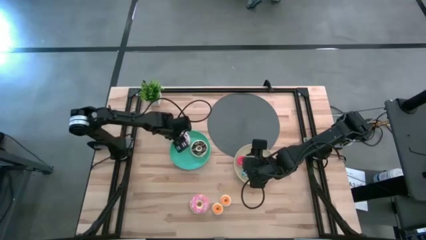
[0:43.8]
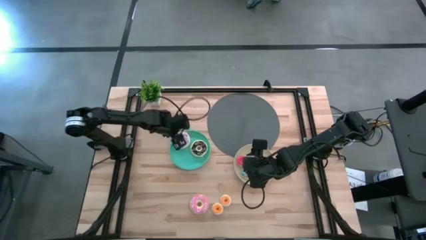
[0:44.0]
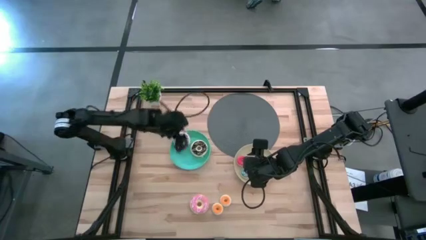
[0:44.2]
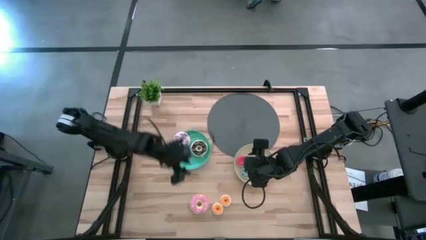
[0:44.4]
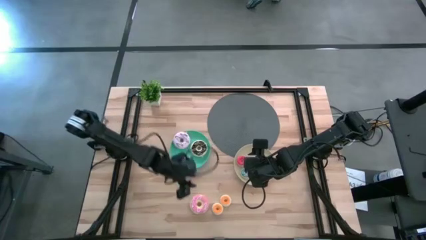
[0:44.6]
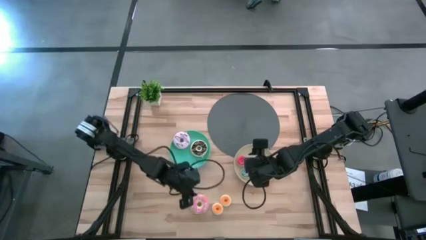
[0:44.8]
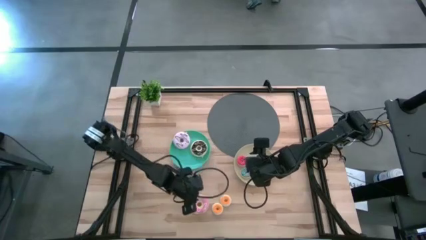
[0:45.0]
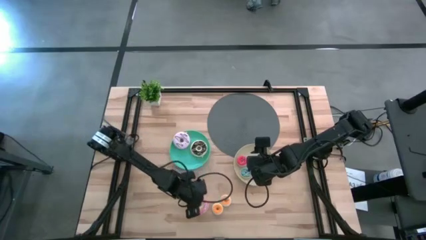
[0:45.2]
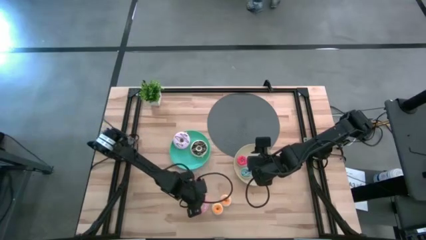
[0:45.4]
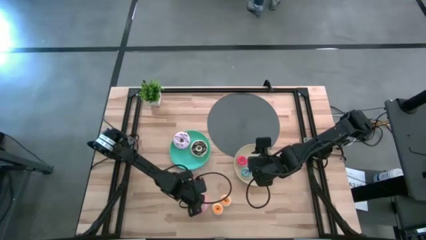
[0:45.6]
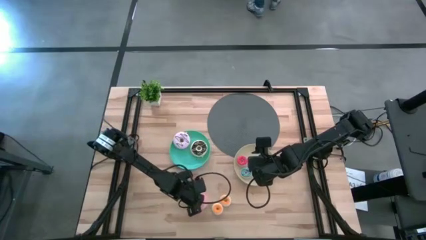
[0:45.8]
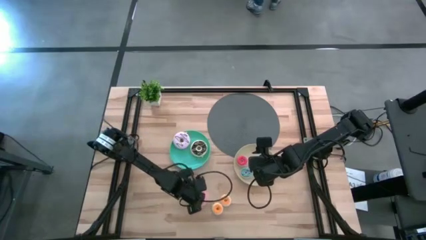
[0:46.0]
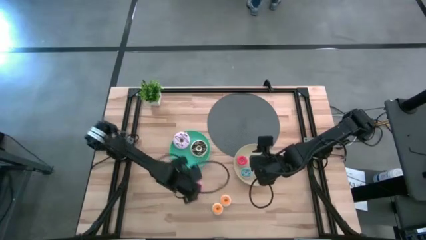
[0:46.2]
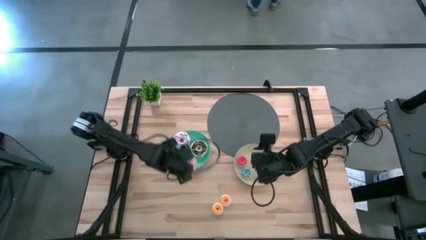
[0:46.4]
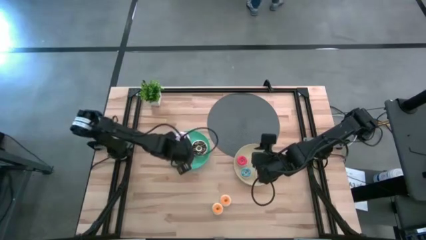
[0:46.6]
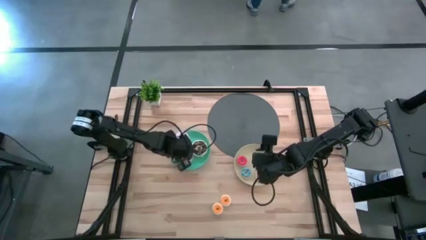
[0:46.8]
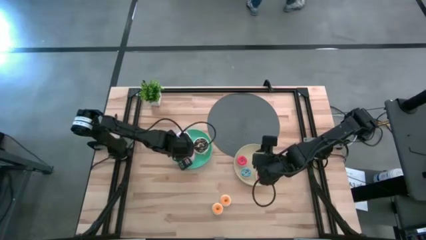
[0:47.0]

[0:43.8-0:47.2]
Task: Pick & Place donuts
Put the big pink doughnut on the blue plate

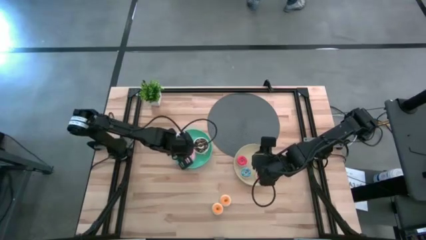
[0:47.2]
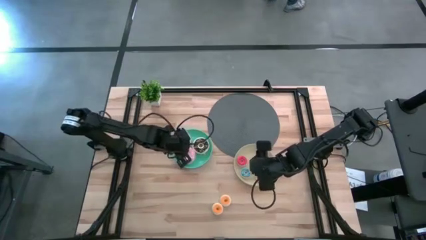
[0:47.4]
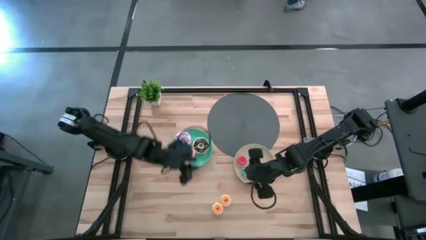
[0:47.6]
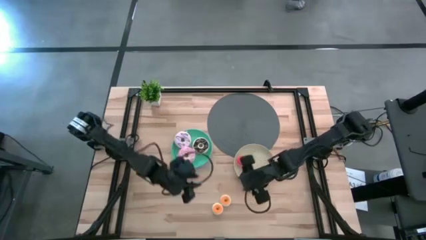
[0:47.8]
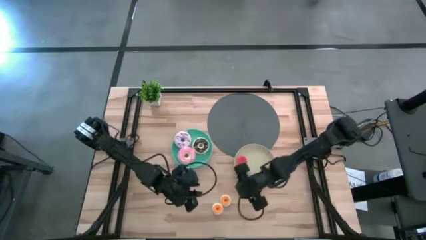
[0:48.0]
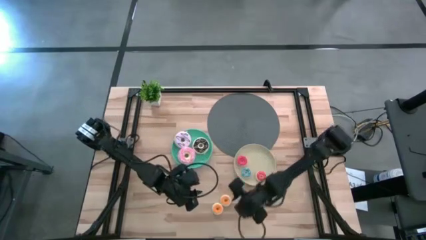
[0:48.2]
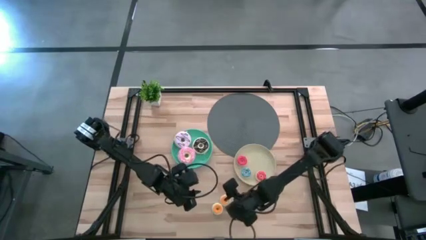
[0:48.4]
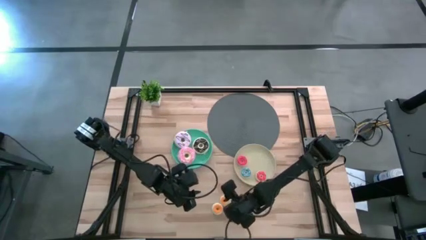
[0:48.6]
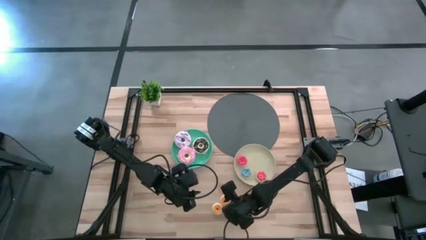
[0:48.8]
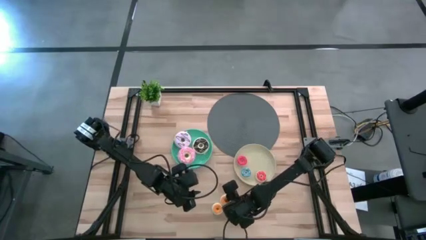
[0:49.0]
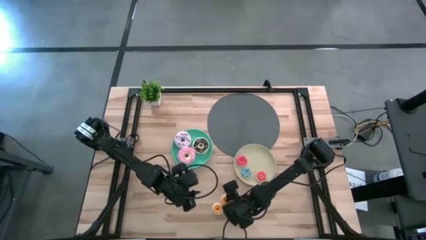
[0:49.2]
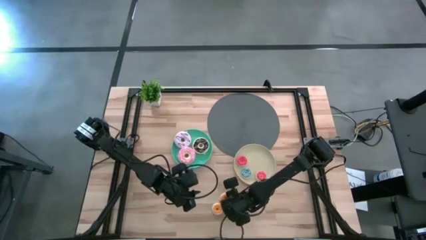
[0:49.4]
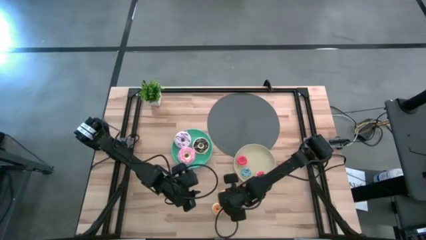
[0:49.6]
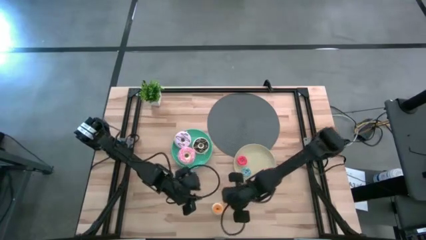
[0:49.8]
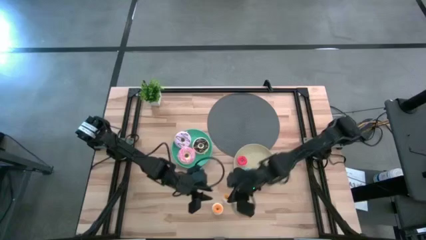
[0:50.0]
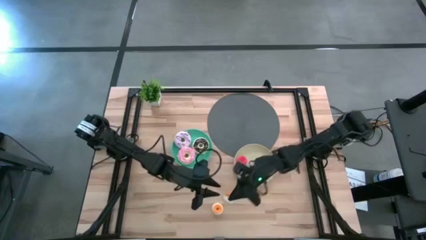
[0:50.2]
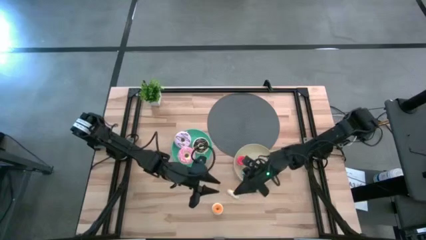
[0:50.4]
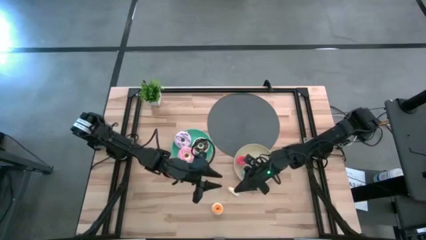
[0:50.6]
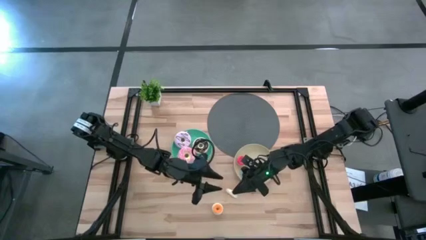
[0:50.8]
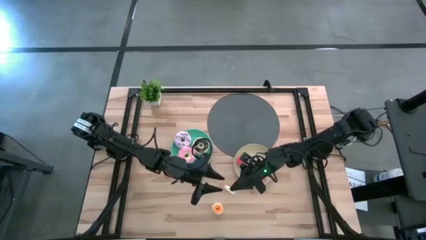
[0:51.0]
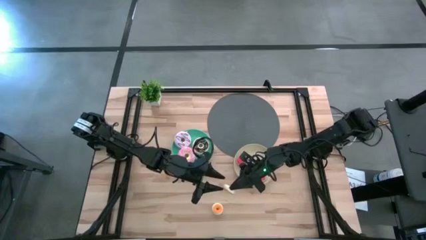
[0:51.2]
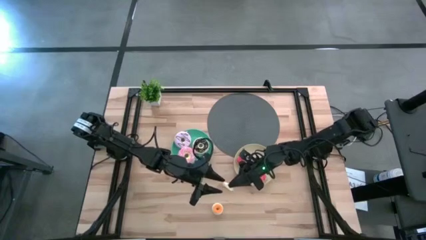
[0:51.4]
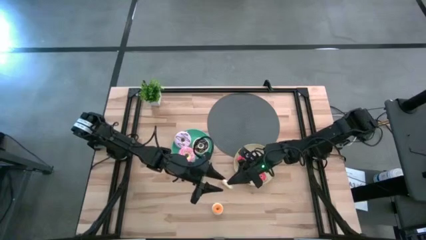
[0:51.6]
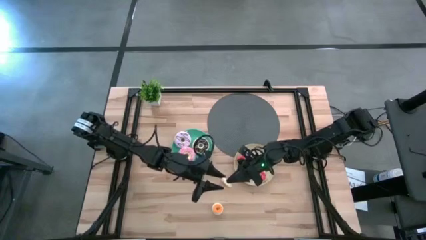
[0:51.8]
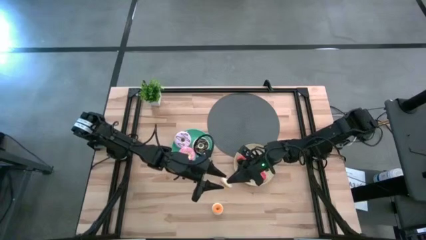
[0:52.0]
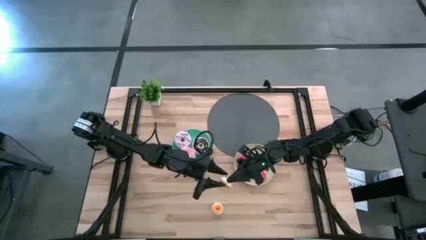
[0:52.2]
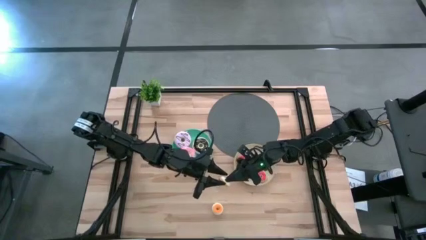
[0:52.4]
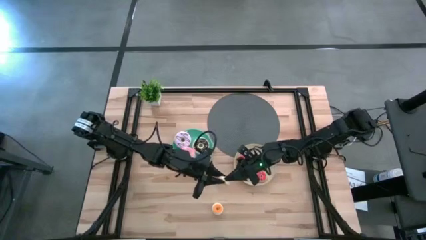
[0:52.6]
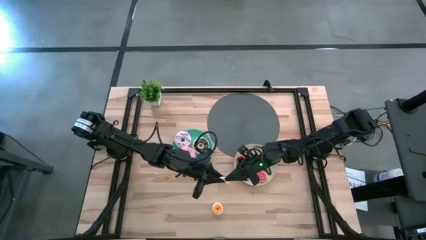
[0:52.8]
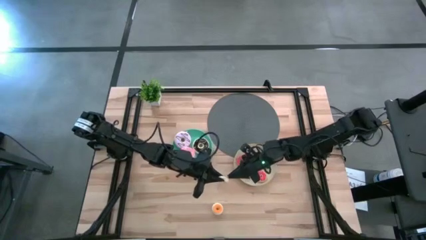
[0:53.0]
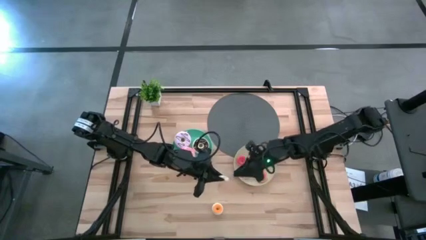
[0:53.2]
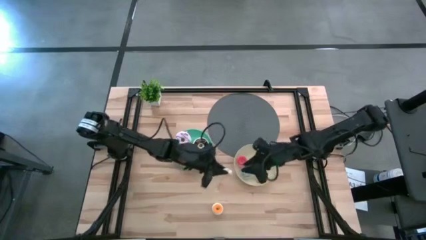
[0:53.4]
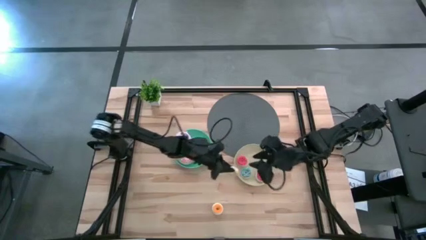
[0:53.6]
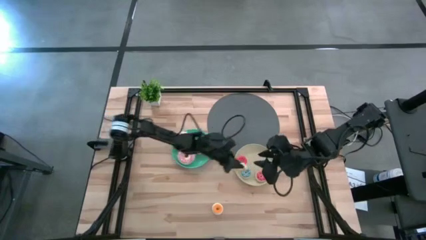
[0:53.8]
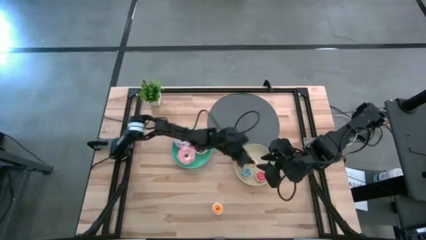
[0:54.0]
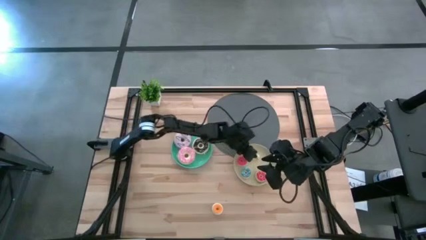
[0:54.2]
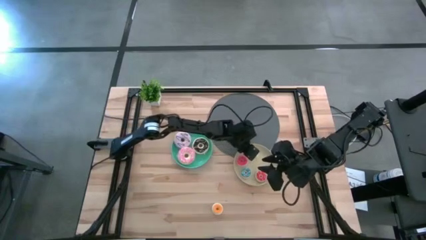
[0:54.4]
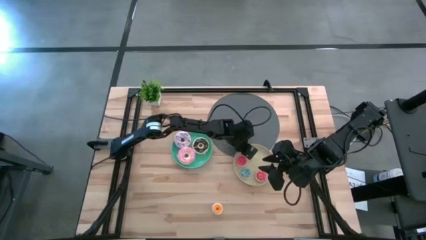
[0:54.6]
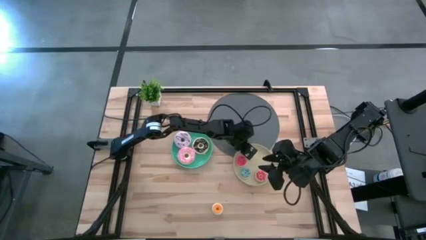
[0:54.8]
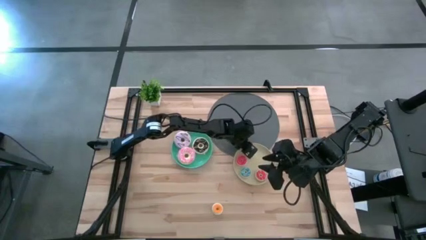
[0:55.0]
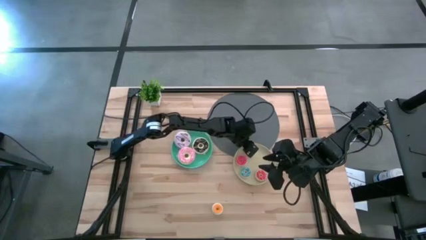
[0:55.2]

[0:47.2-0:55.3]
Put the small yellow doughnut on the brown plate

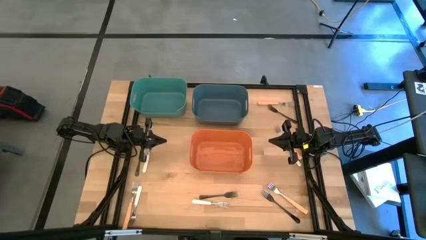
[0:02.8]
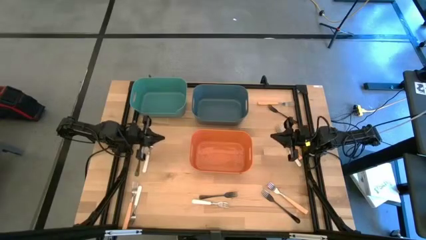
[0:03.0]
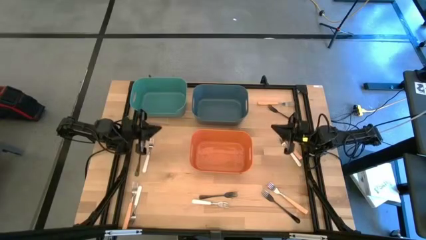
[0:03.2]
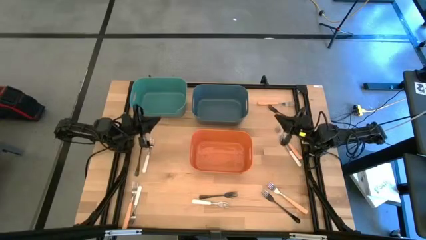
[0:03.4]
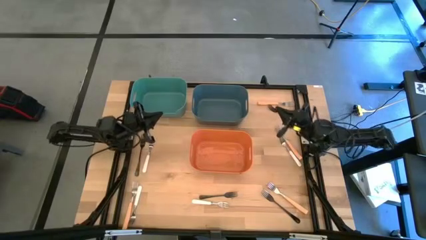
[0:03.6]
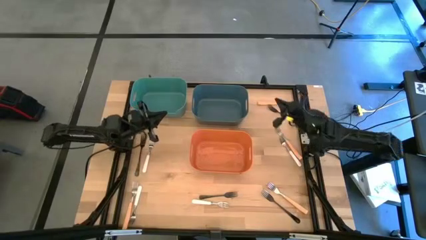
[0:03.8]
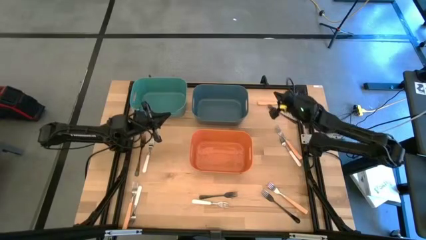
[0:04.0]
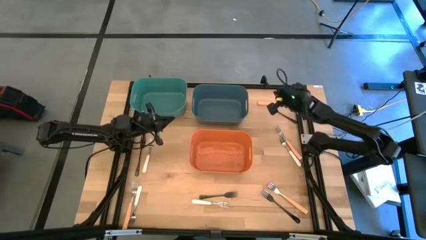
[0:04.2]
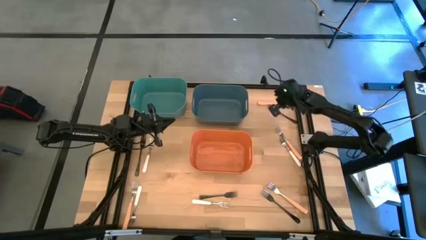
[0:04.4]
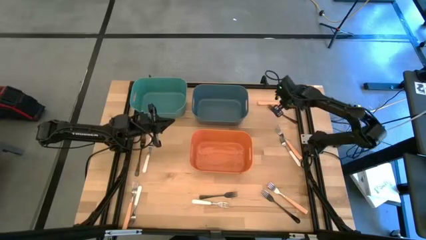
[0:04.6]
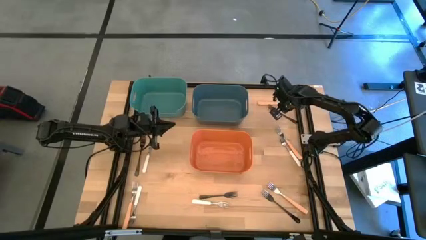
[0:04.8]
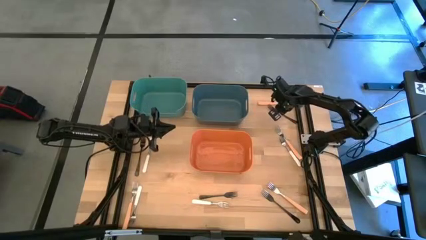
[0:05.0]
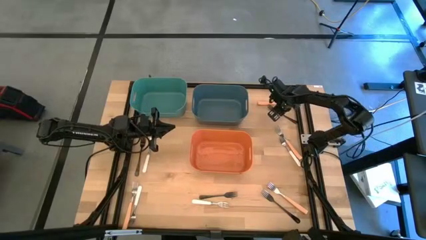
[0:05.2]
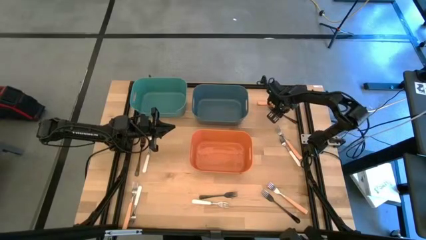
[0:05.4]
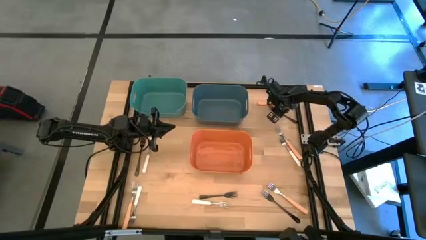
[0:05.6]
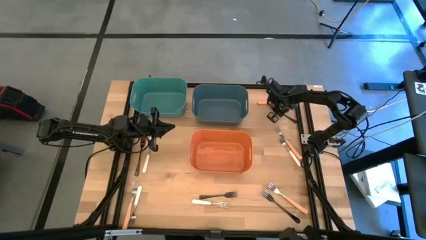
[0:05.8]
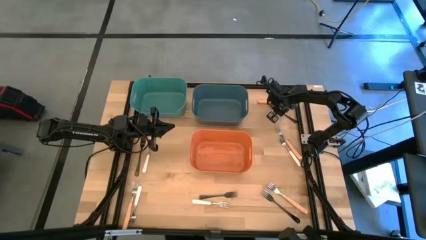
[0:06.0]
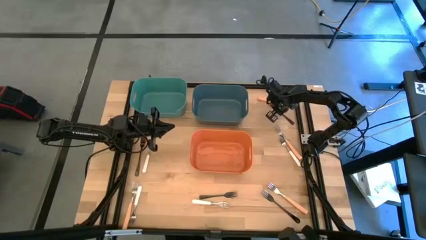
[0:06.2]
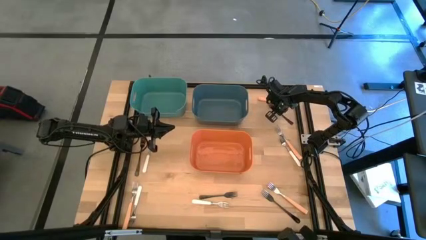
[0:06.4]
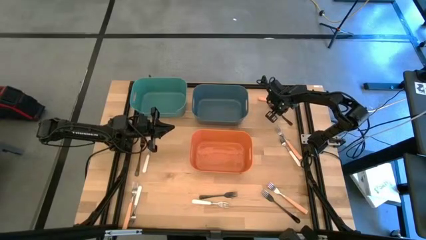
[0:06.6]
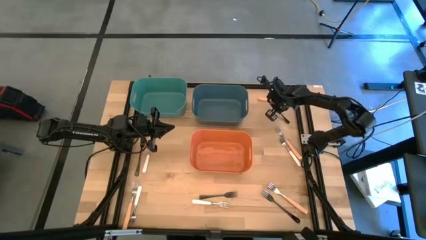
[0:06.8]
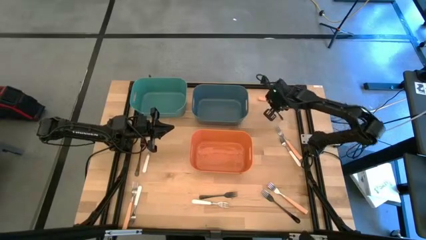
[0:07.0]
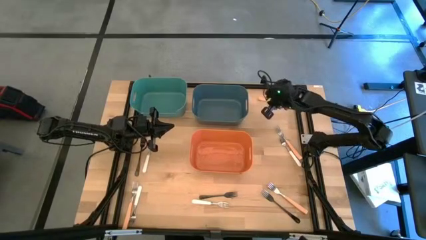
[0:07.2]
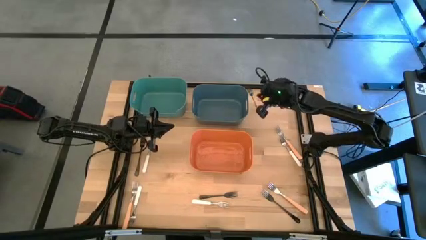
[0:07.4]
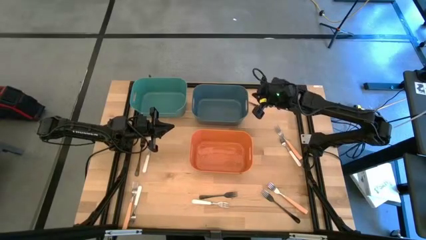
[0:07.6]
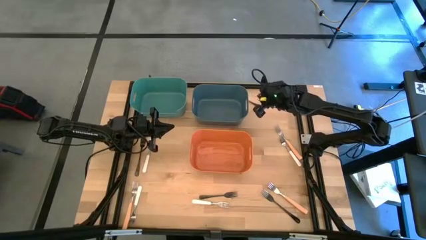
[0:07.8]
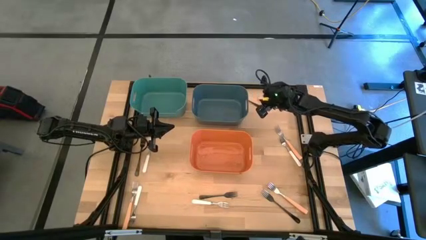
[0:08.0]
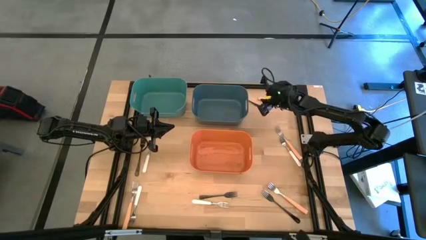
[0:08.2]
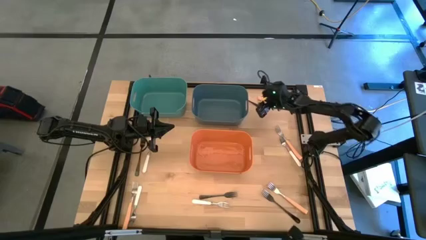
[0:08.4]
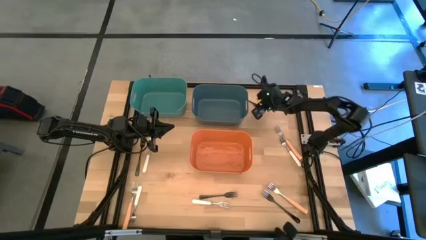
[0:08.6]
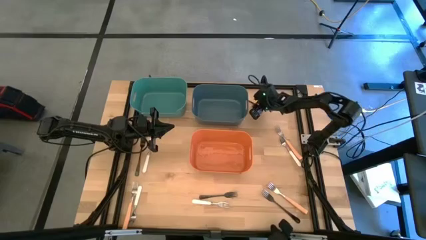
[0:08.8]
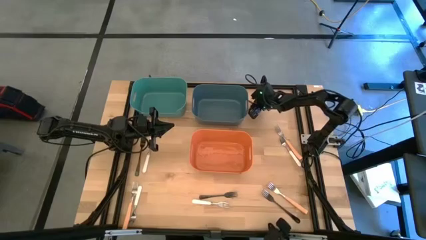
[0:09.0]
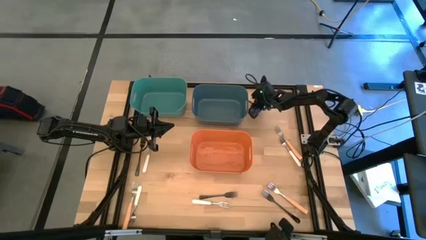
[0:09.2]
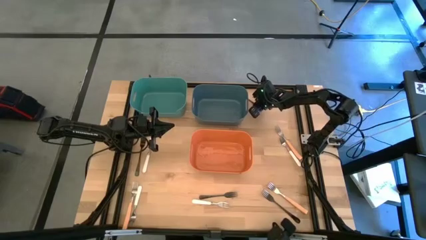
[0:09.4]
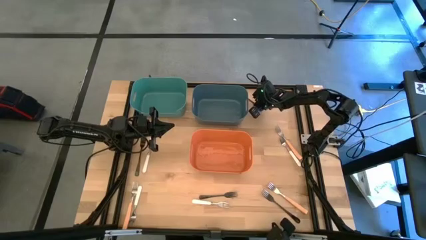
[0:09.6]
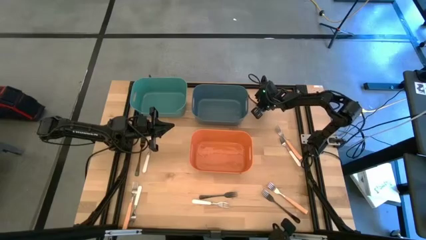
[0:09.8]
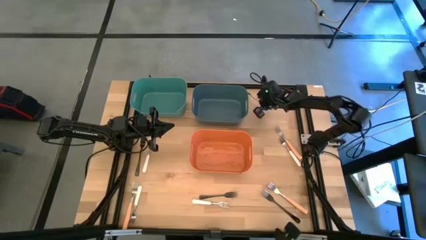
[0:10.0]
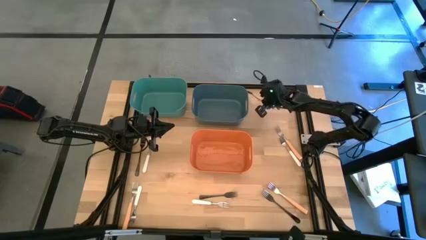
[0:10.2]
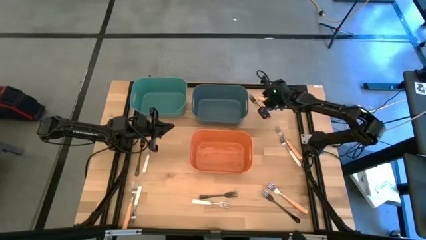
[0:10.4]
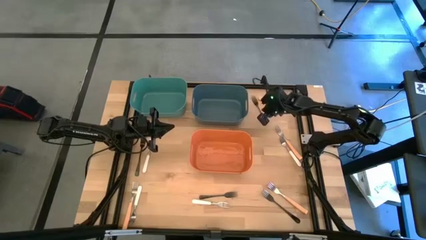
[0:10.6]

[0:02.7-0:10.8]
Task: Sort silverware by color (type)
Put the black fork into the blue bin
